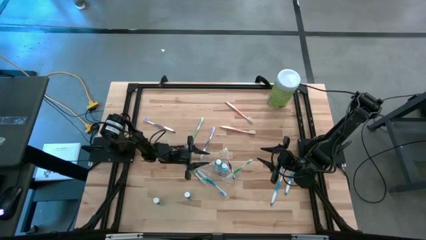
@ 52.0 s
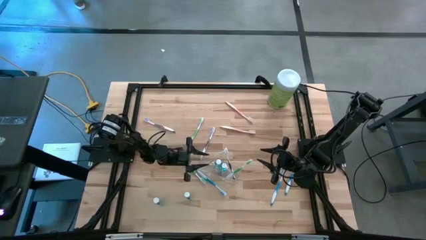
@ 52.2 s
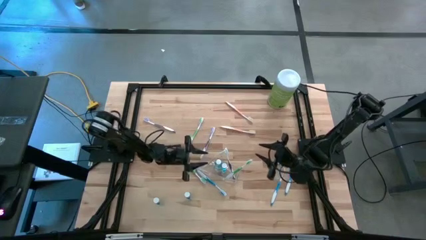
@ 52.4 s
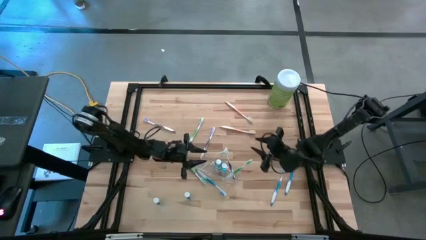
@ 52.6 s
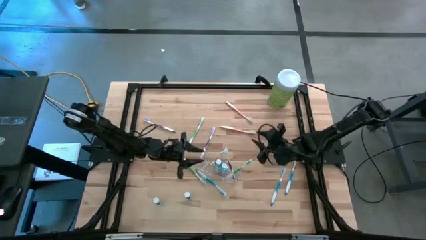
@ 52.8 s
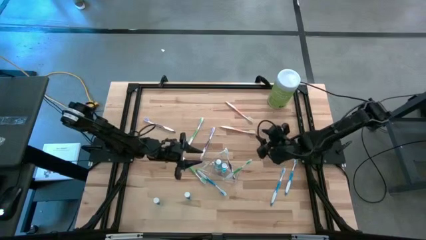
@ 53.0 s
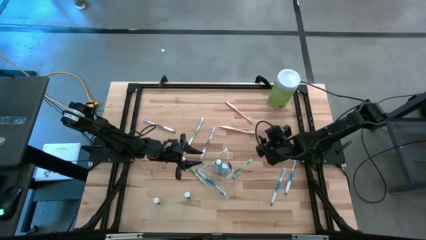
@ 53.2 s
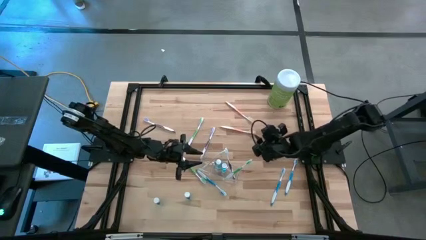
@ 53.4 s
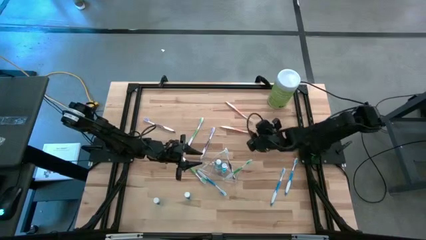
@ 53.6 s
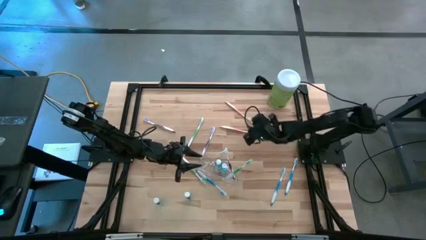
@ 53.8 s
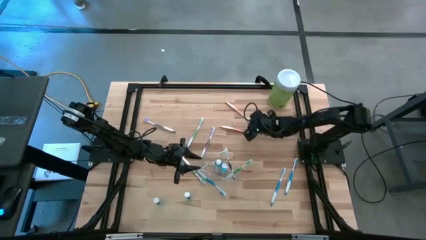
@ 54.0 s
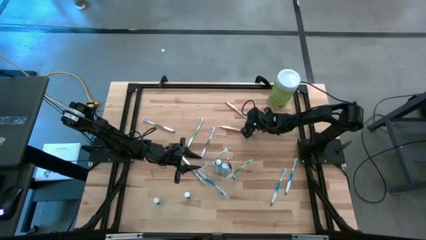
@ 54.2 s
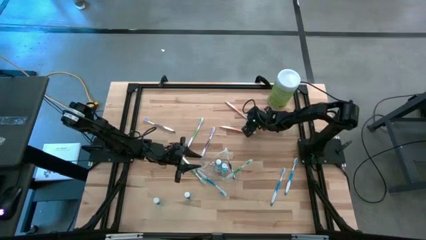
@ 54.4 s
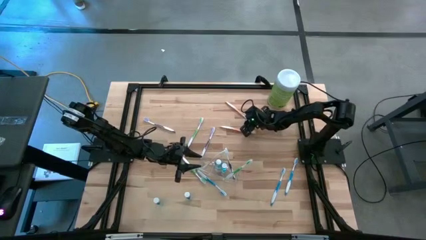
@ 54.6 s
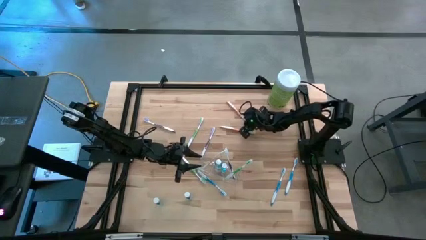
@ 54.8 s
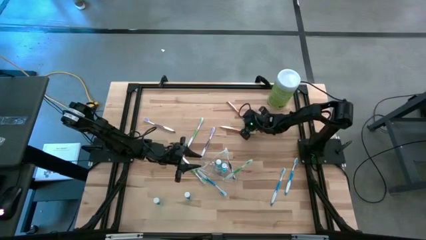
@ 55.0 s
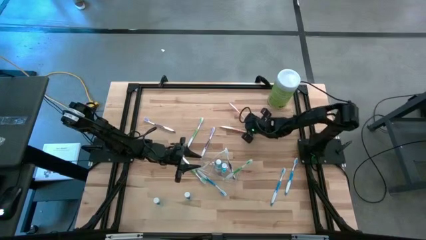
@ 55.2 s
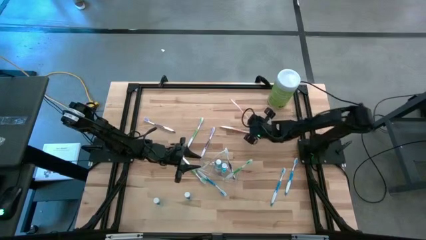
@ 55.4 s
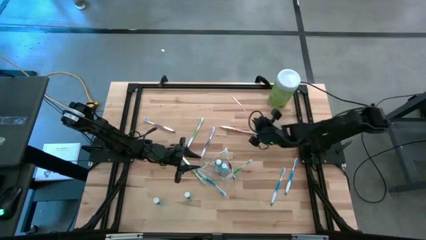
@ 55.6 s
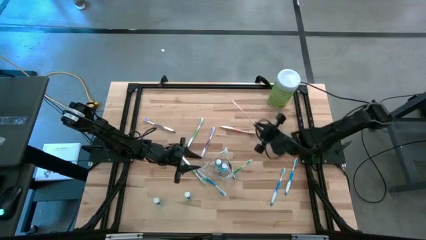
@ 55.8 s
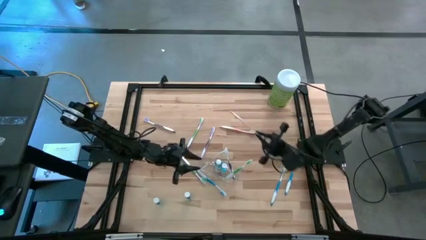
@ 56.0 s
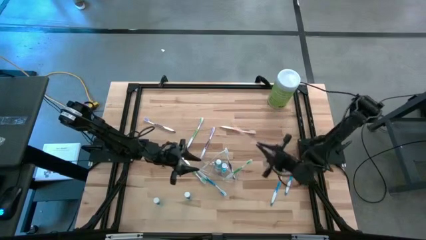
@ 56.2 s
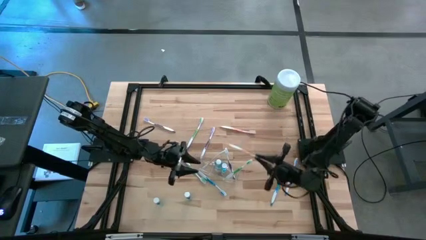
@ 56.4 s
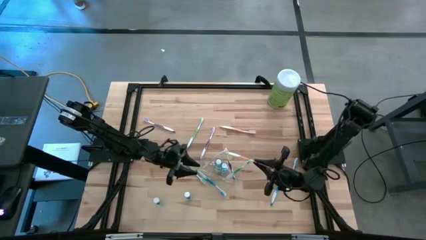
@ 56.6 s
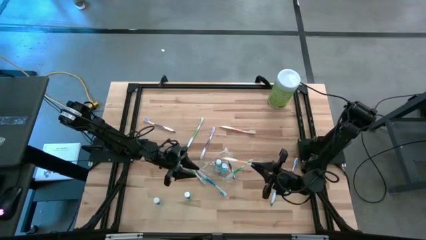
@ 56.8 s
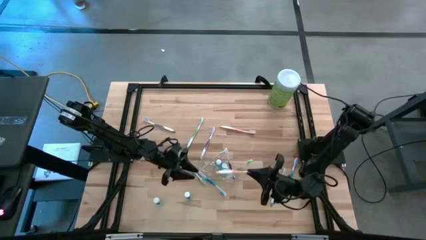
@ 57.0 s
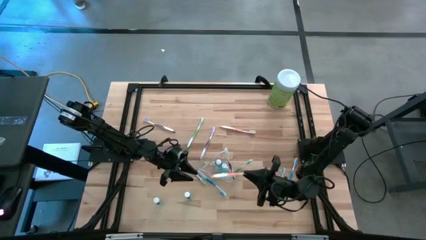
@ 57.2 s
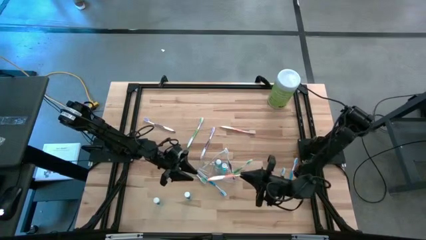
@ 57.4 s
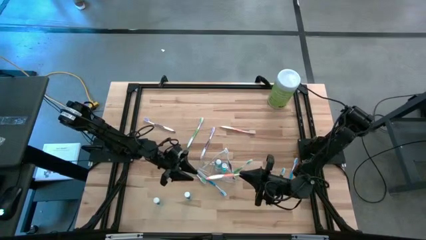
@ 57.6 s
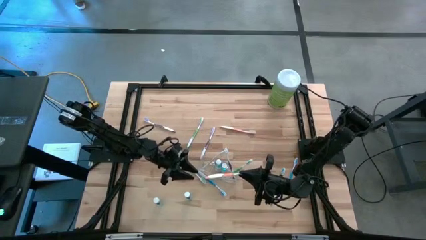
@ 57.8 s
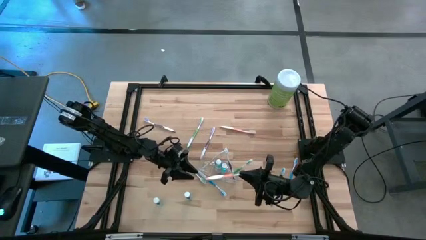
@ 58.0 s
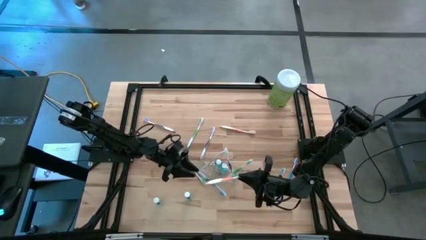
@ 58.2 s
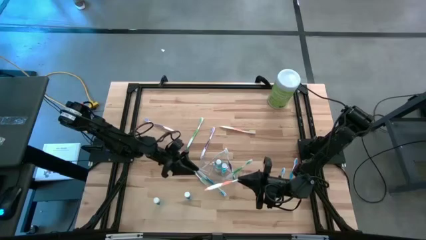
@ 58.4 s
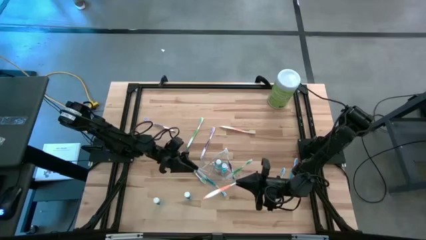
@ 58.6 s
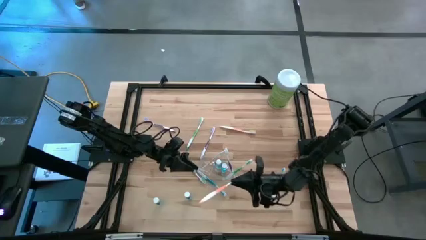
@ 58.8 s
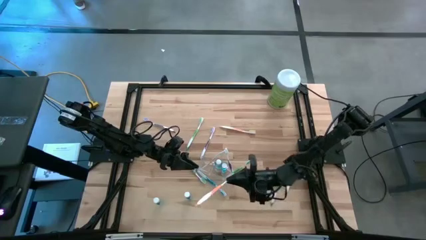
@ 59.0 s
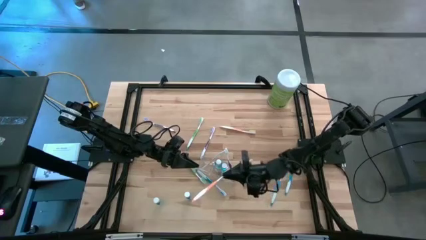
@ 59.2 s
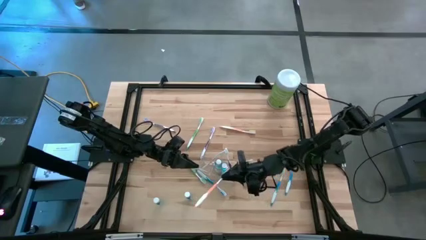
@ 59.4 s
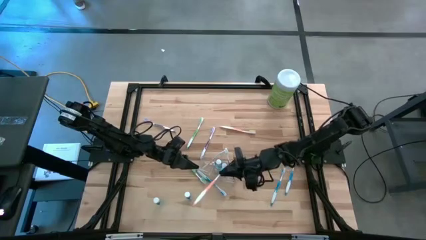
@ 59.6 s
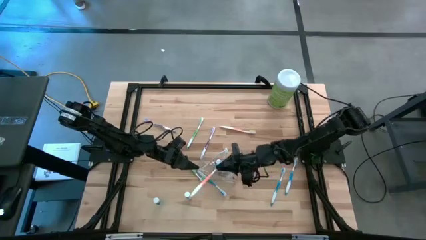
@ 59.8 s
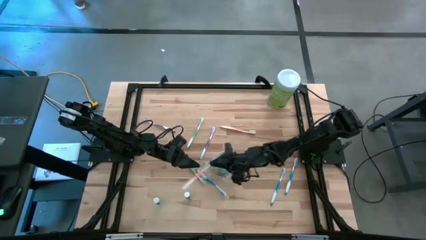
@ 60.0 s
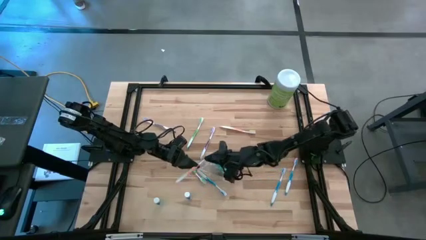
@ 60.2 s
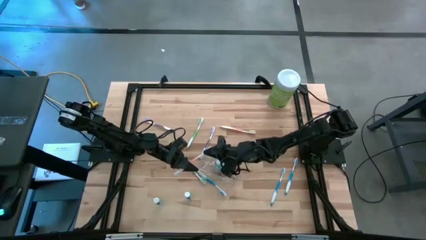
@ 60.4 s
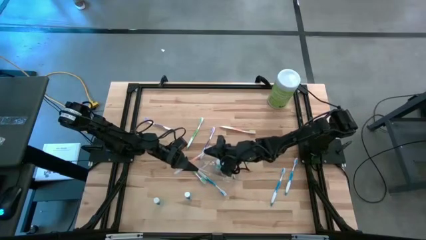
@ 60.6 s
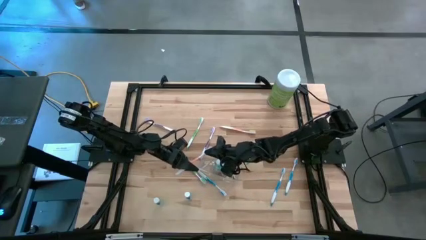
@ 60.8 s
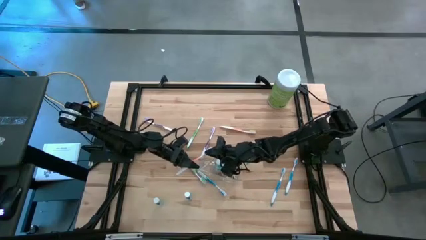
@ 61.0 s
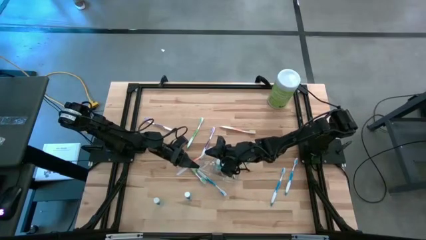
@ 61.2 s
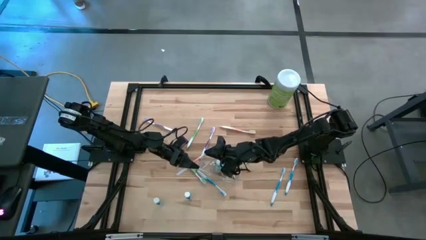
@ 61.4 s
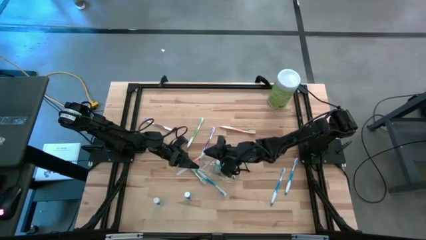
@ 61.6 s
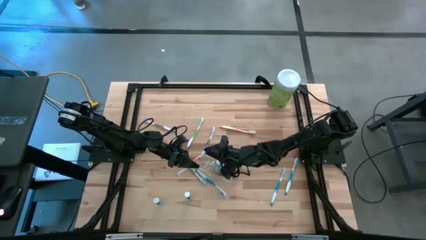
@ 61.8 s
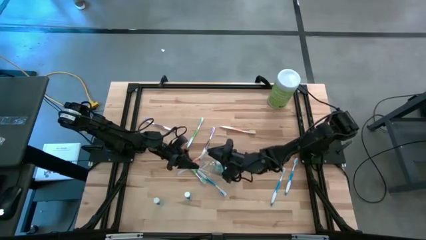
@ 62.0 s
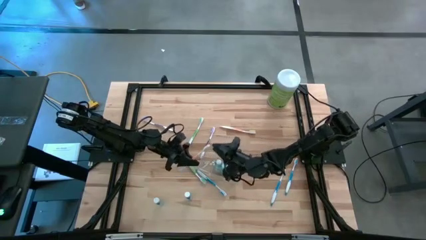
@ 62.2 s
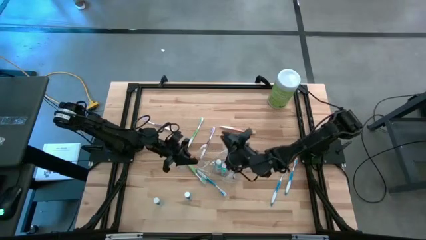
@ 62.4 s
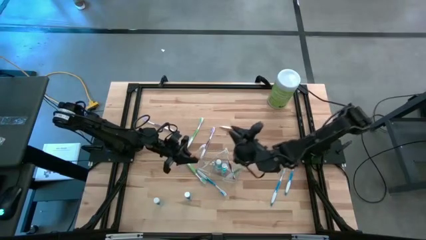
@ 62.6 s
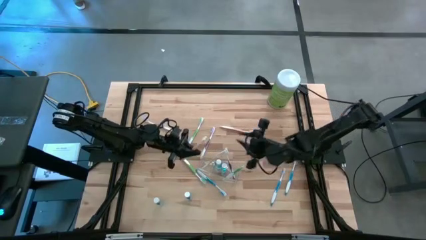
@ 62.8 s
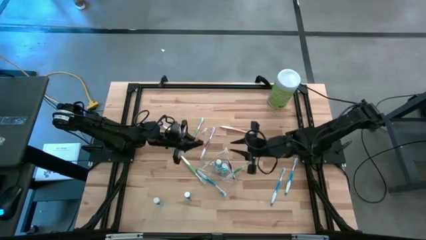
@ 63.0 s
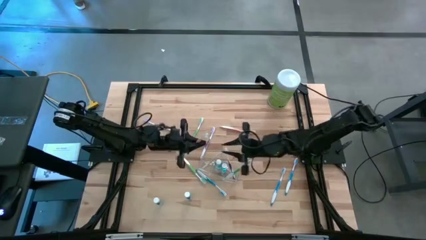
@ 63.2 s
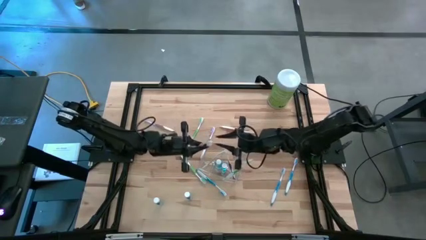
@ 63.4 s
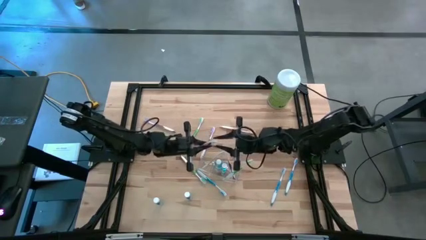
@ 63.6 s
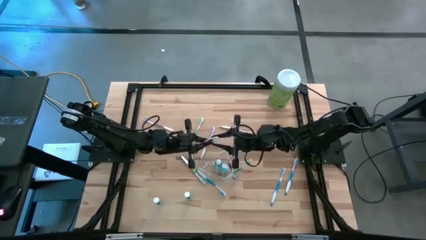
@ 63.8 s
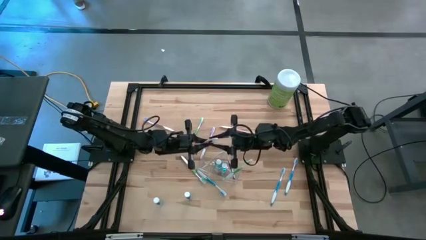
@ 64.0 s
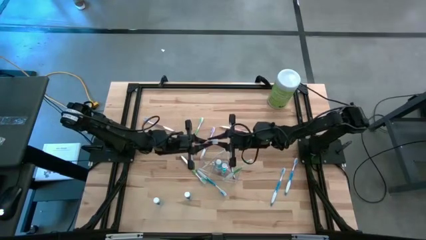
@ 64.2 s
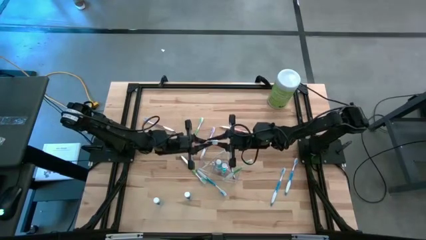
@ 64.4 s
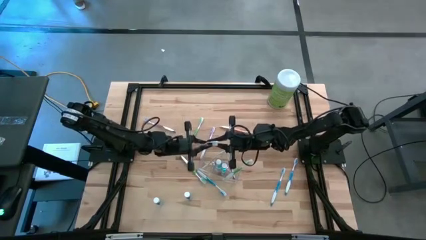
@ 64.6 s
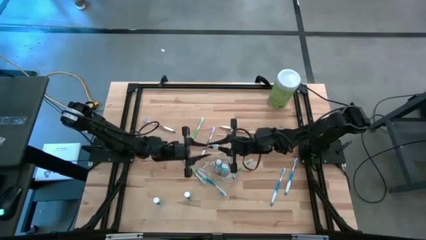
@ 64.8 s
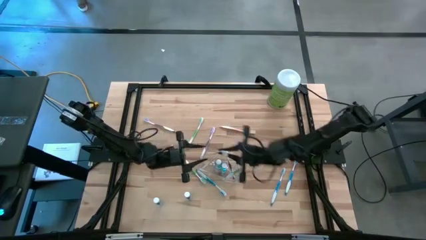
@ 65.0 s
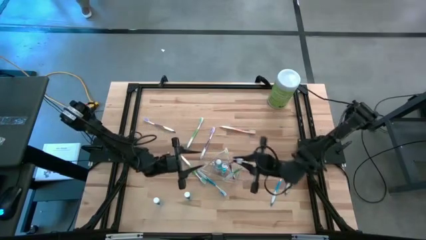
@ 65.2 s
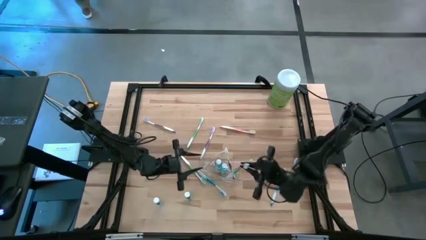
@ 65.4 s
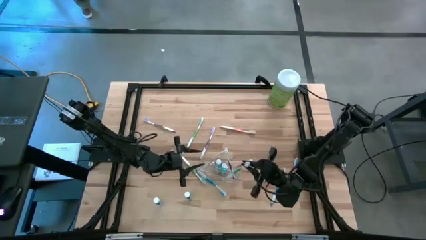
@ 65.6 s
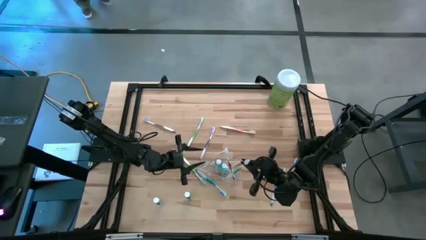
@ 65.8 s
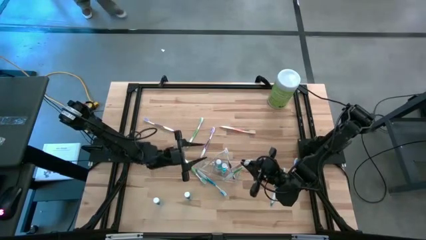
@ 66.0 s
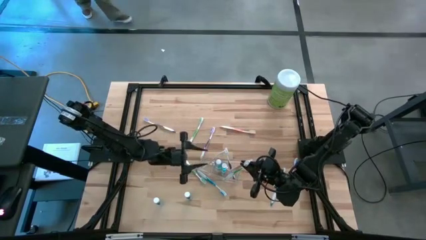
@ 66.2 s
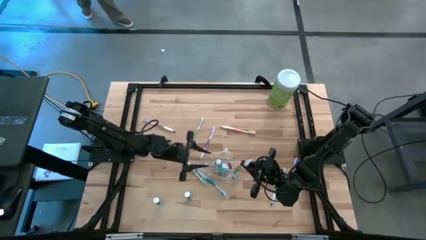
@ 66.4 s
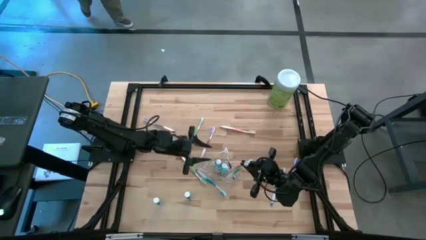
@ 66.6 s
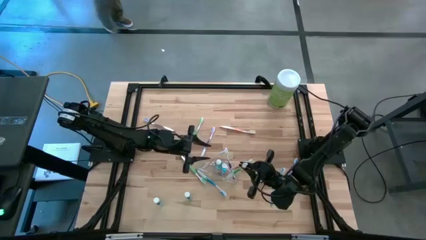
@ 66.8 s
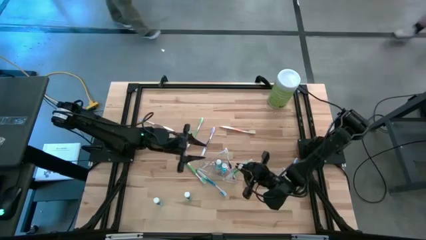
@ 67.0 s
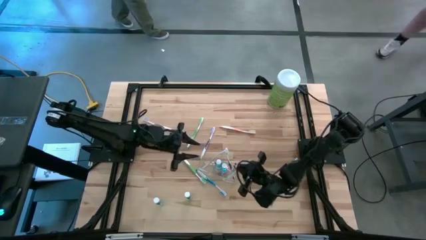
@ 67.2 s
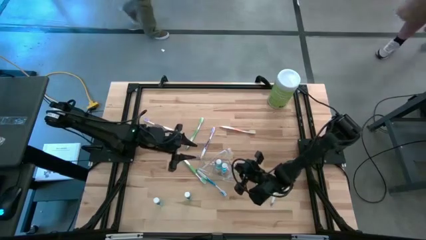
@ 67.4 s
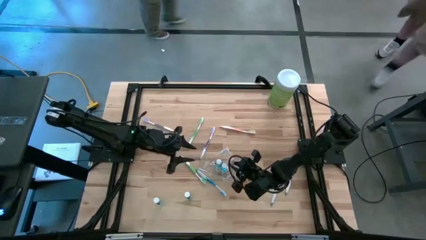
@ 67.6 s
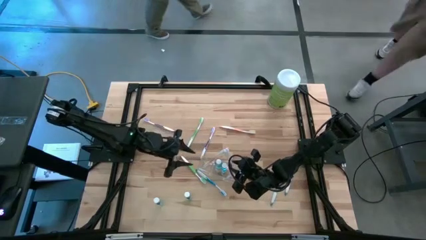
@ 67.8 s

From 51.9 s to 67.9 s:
Task: Pick & Place toothbrushing station
Put the orange toothbrush into the transparent organizer
